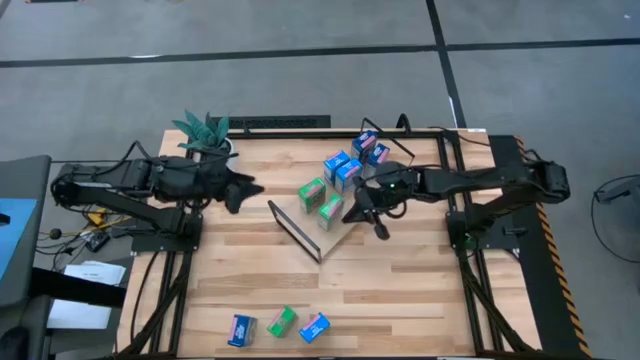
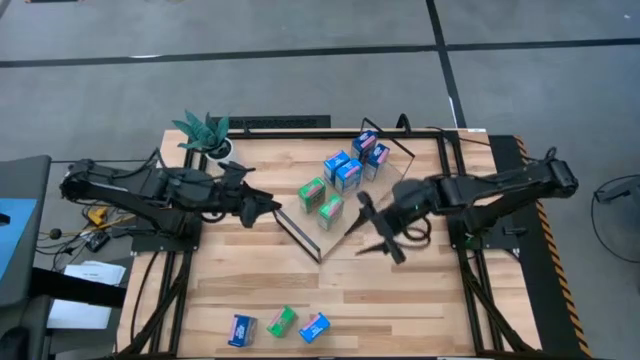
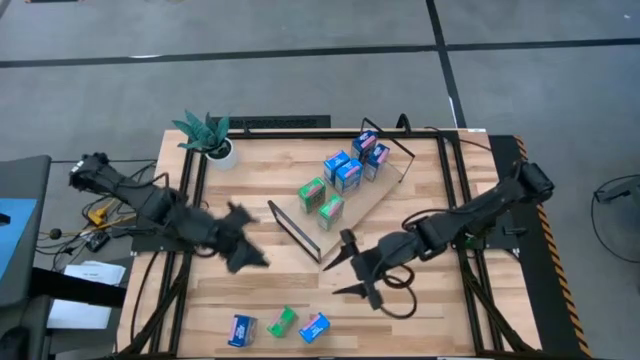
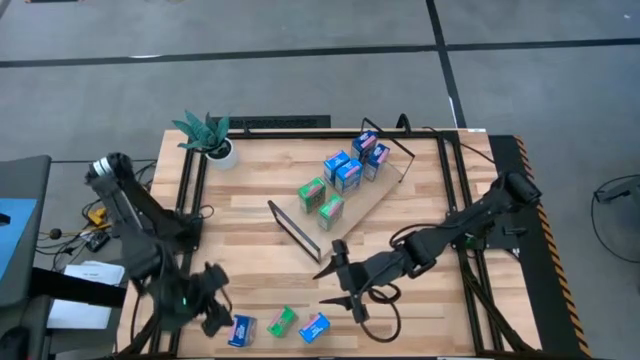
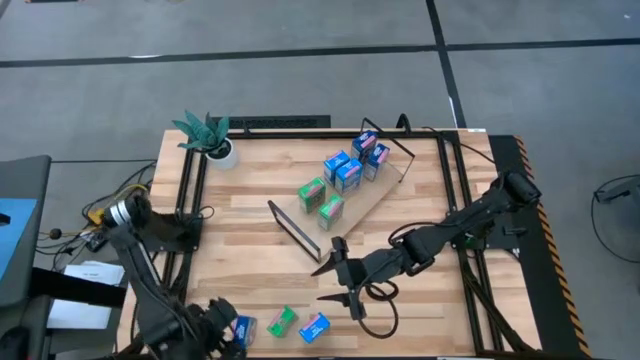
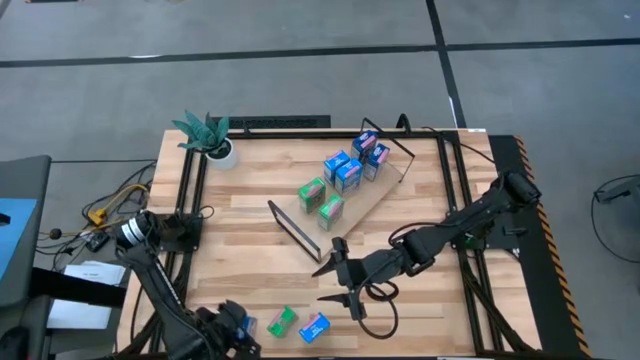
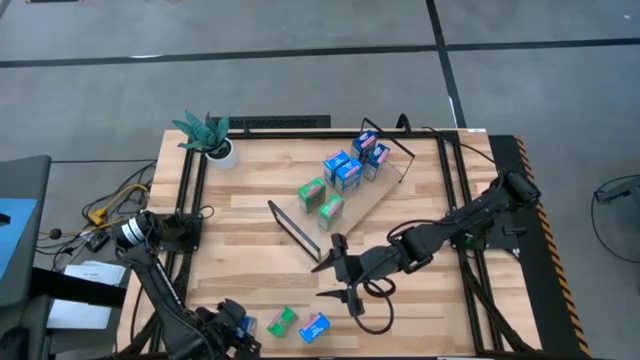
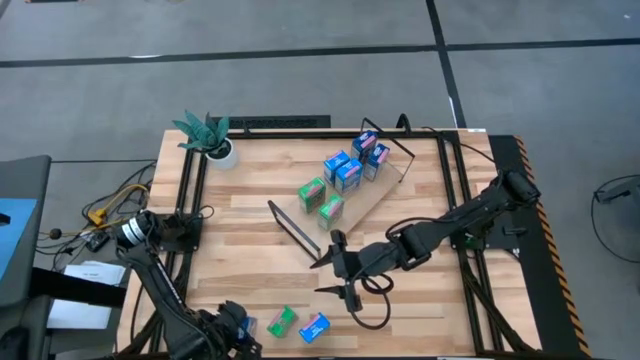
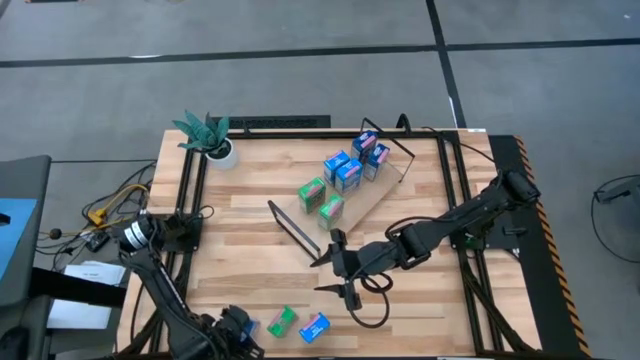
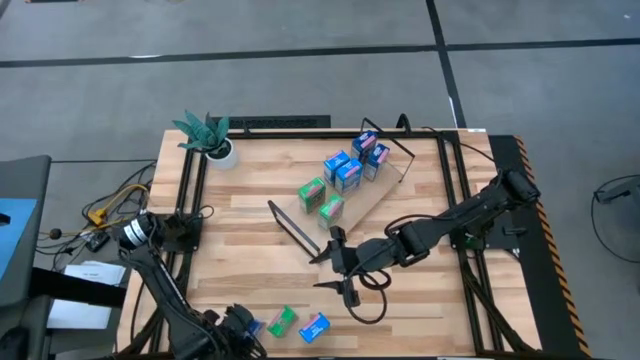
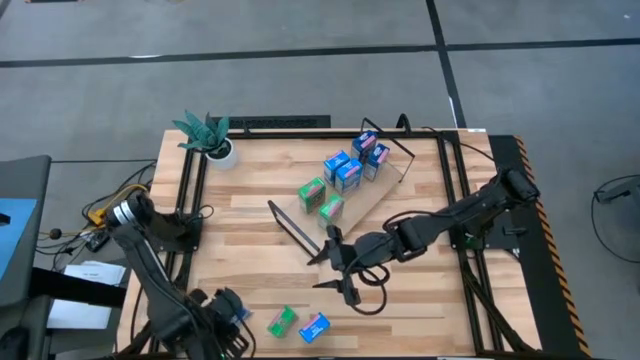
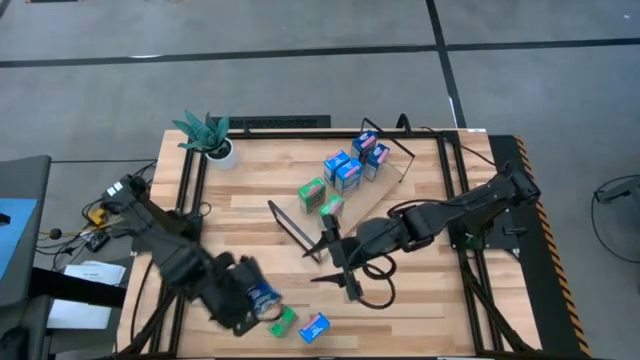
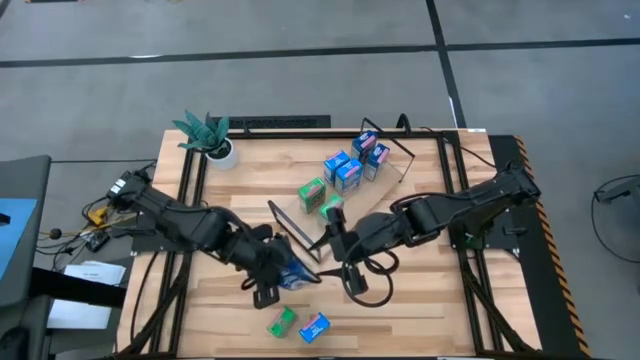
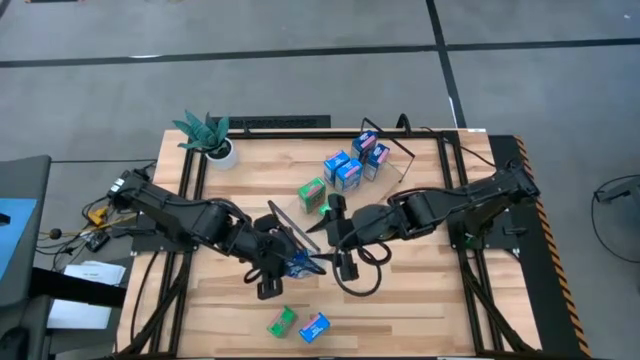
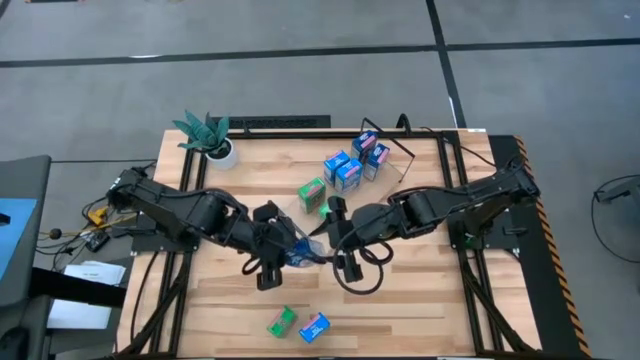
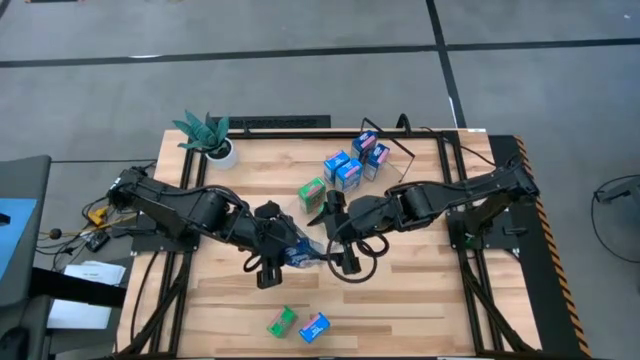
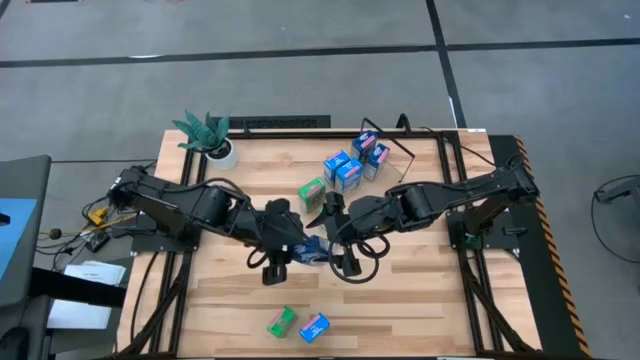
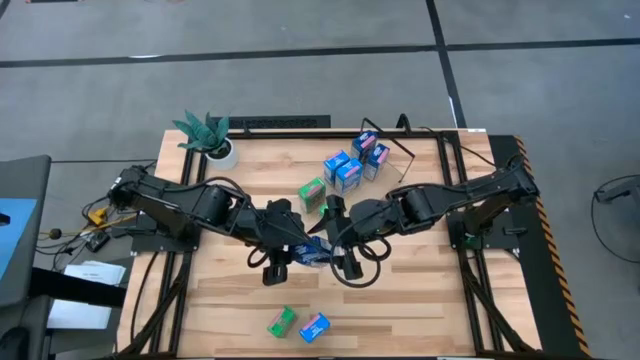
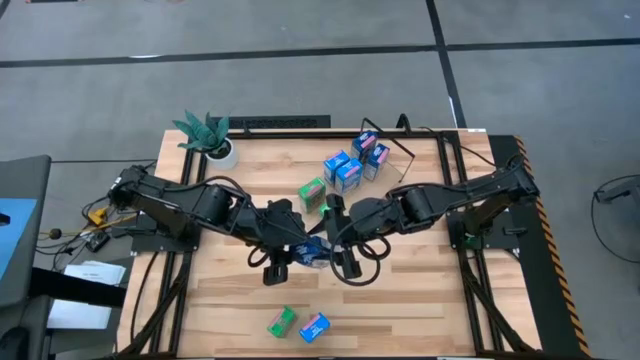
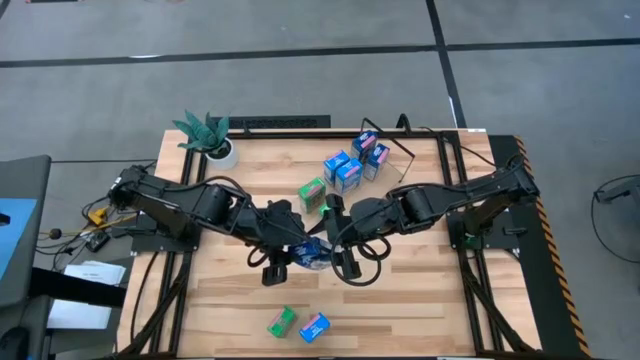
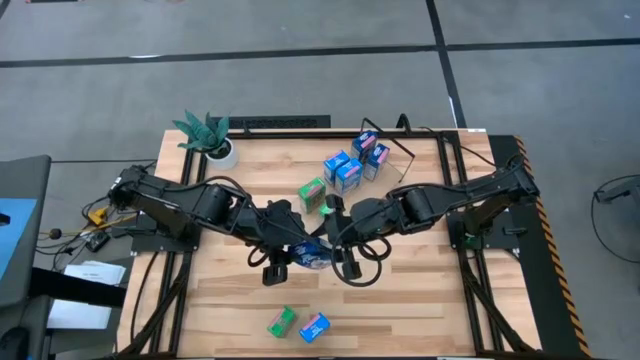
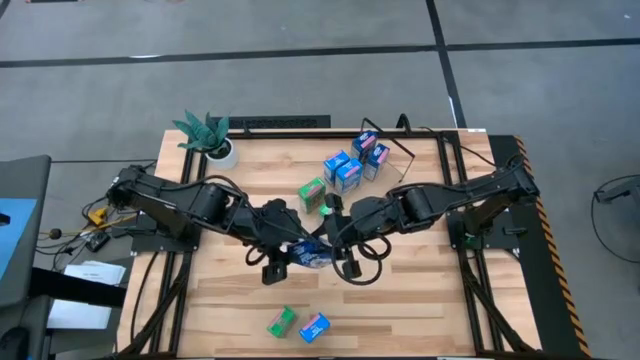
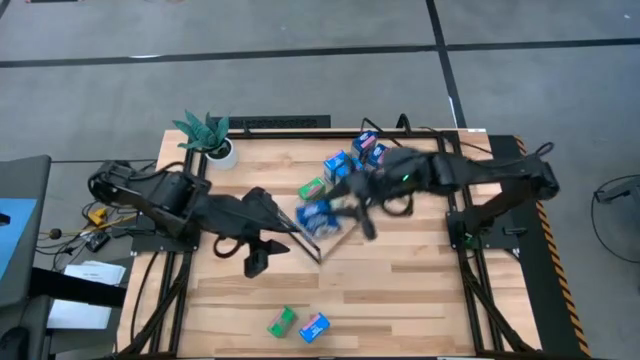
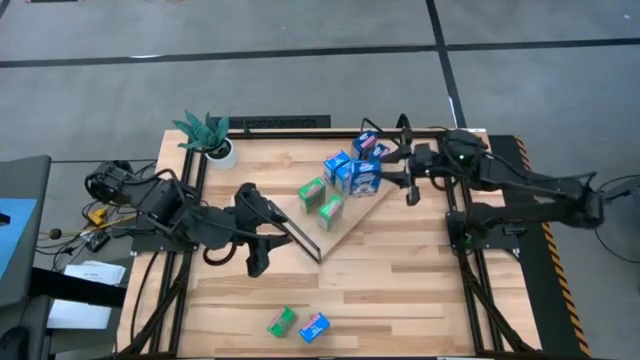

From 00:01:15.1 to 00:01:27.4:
Task: Stack cereal on shelf
Put the blue cereal box on the shelf aligned with the blue cereal boxes

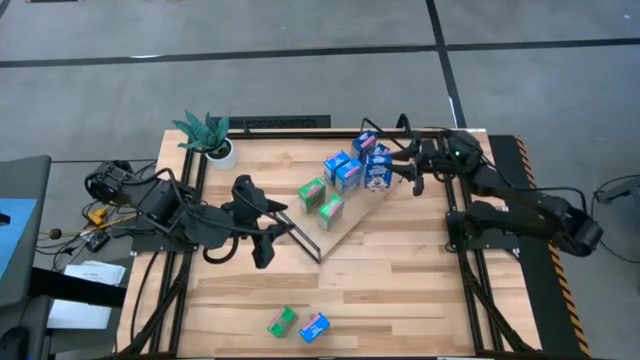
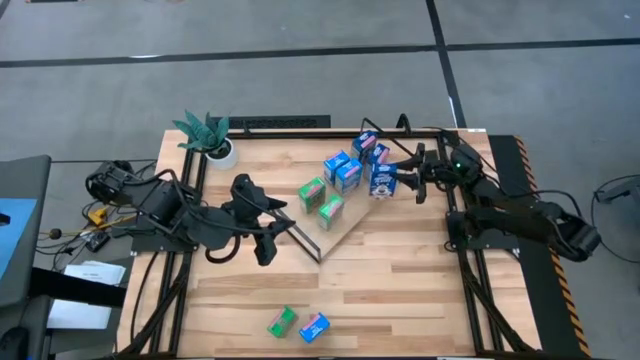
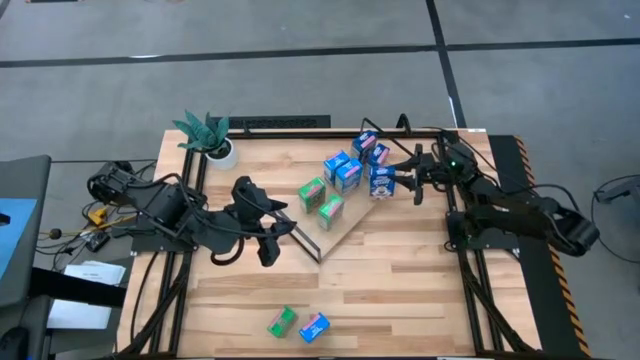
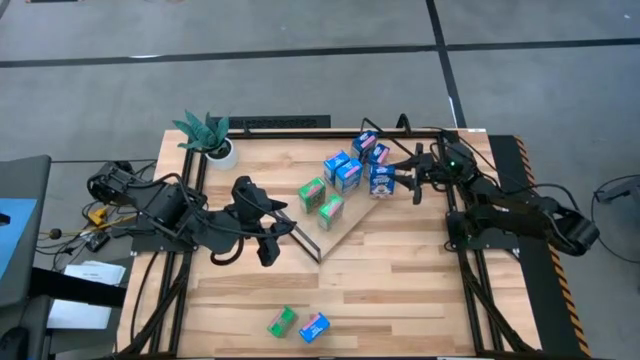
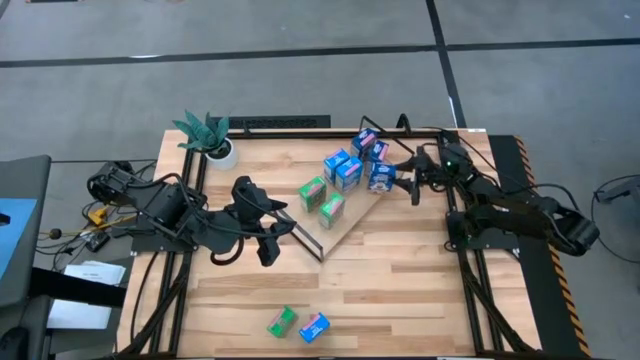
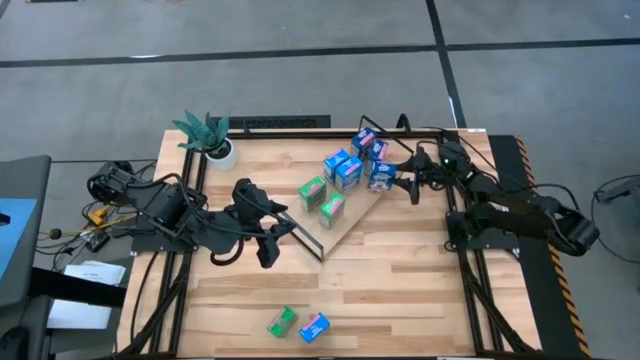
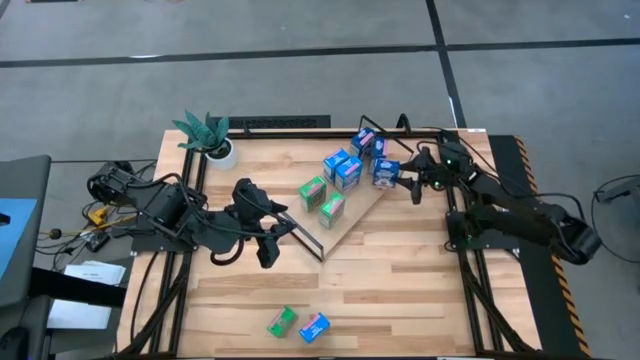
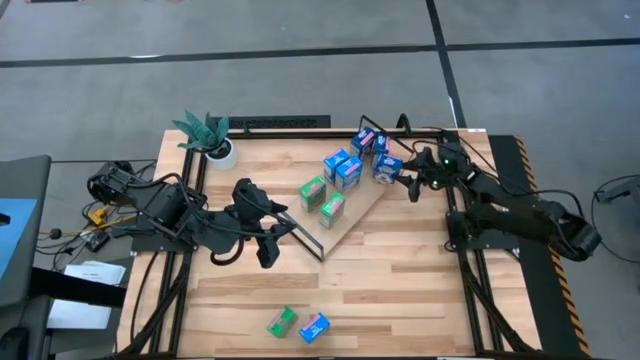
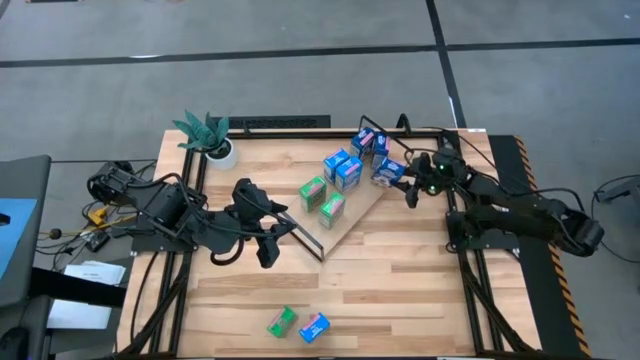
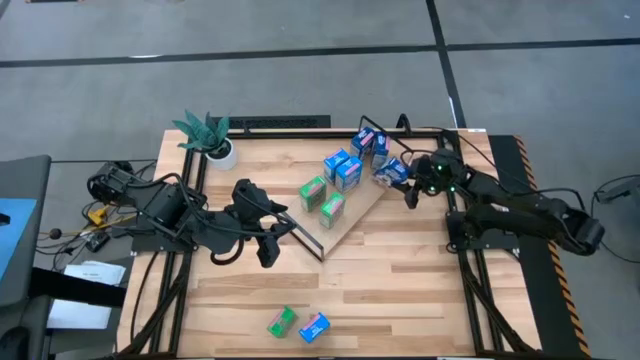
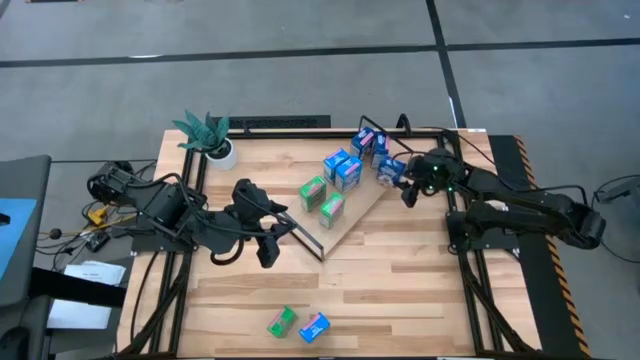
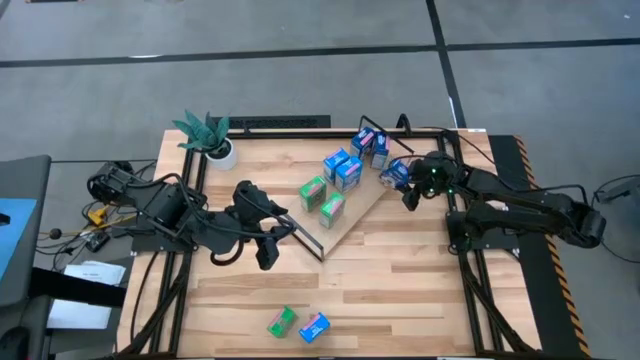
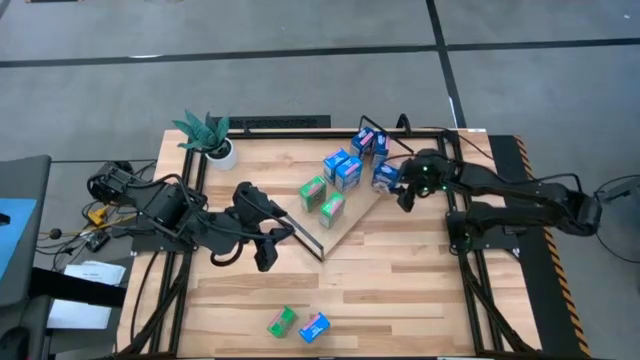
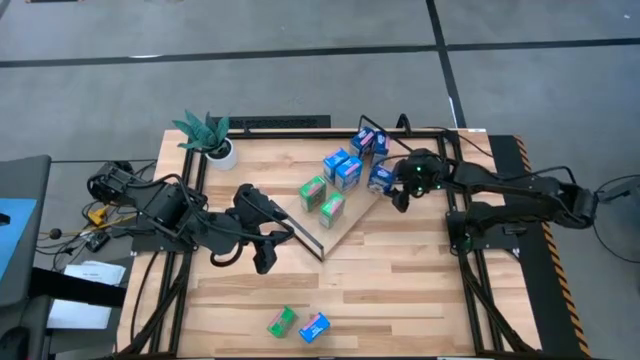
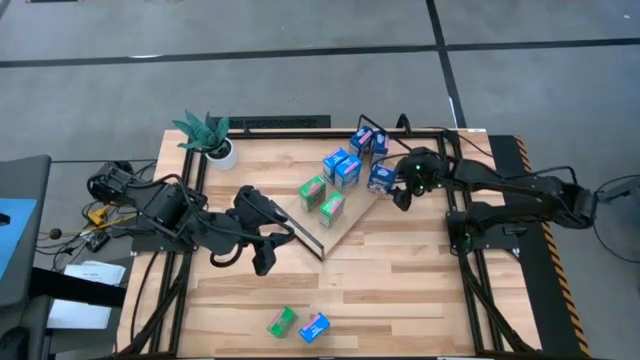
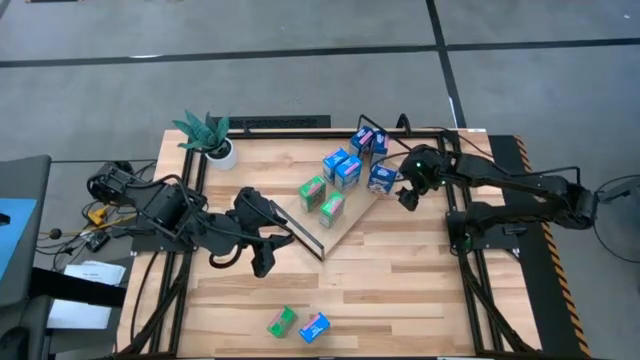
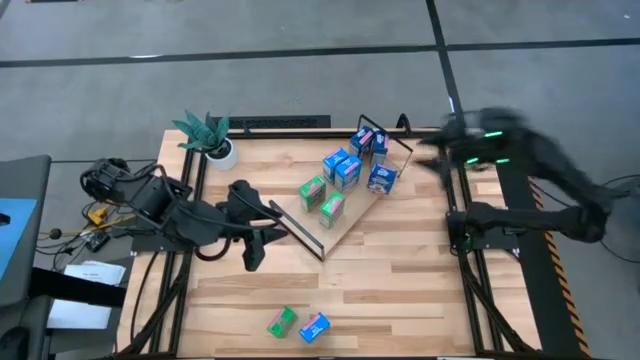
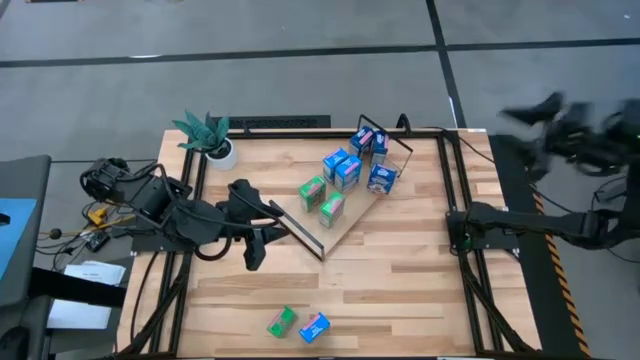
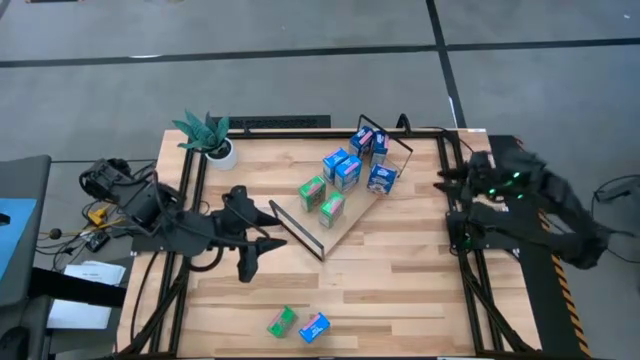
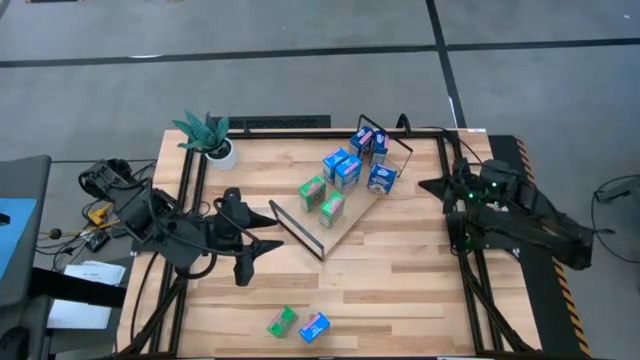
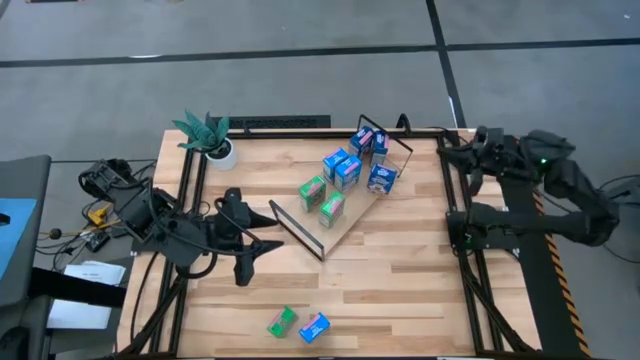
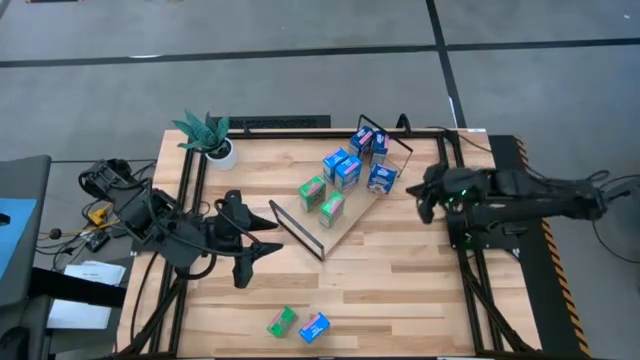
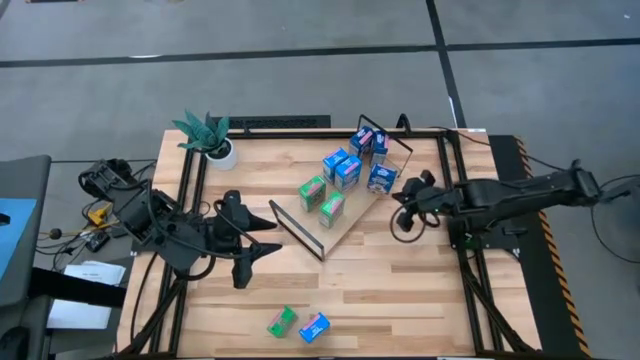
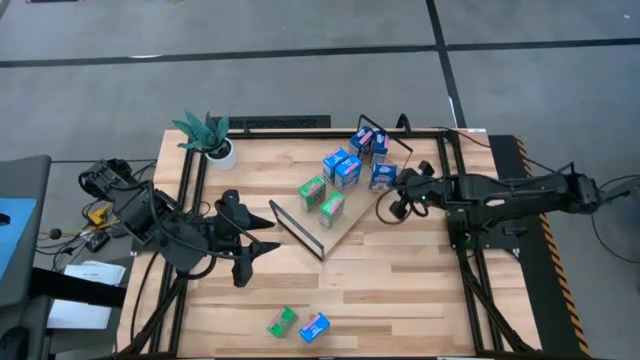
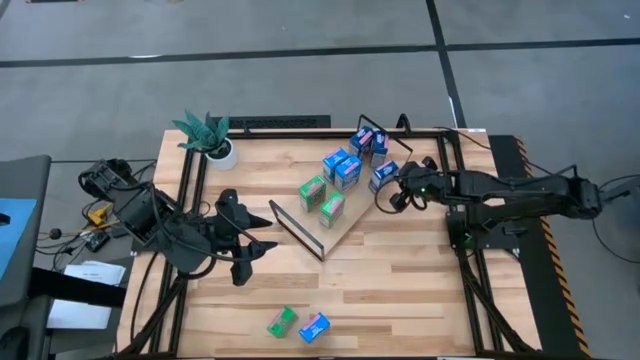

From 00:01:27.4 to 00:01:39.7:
Put the blue cereal box on the shelf aligned with the blue cereal boxes
